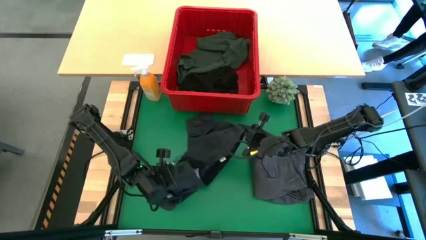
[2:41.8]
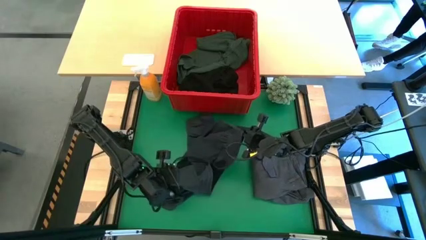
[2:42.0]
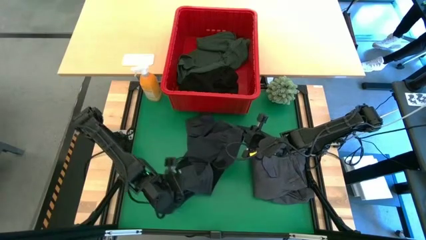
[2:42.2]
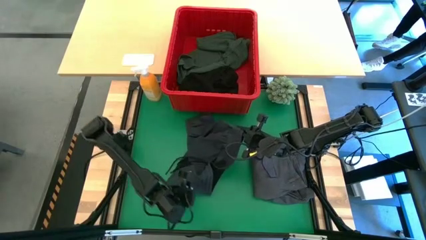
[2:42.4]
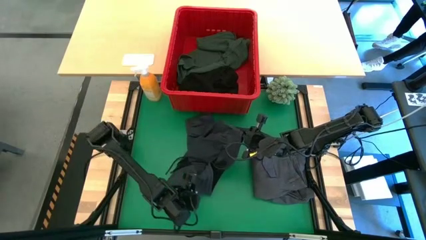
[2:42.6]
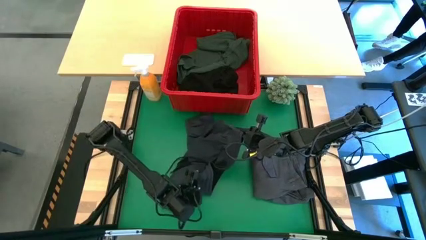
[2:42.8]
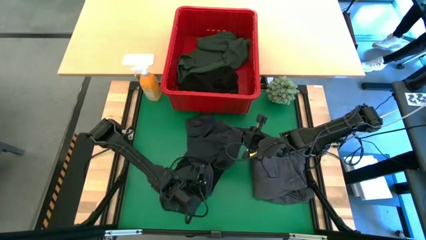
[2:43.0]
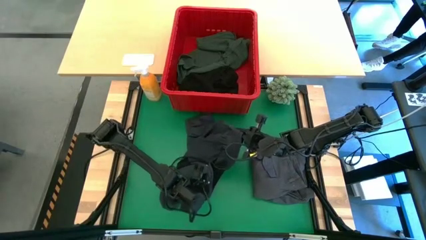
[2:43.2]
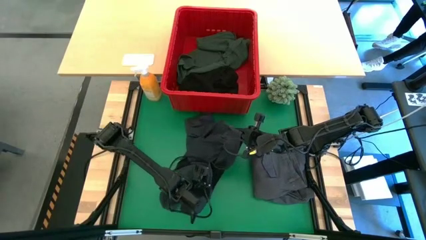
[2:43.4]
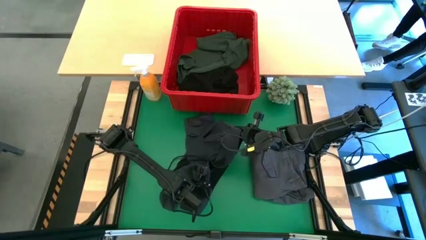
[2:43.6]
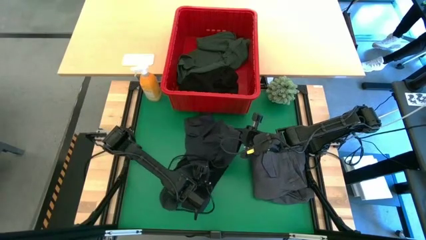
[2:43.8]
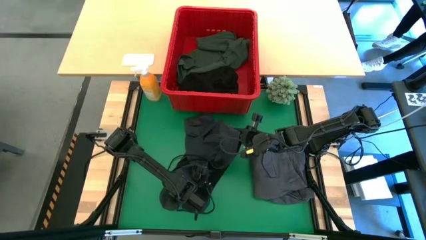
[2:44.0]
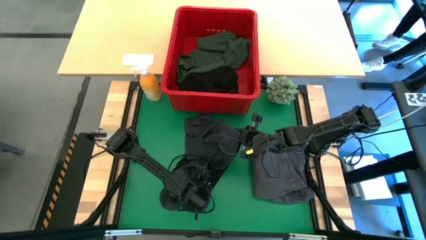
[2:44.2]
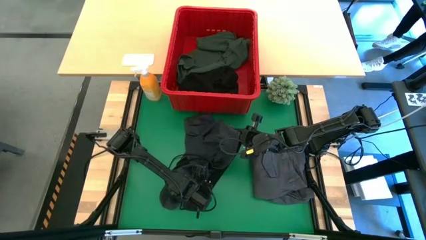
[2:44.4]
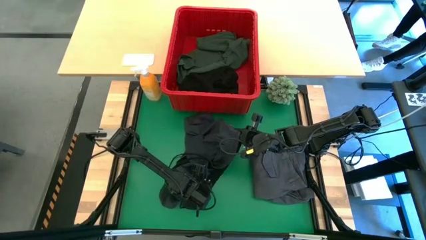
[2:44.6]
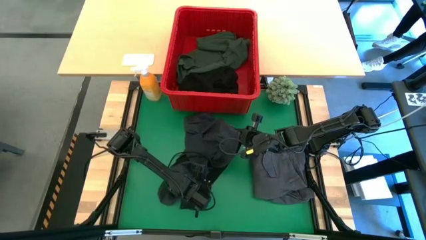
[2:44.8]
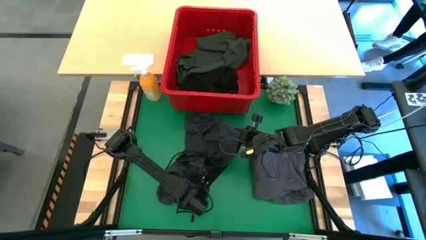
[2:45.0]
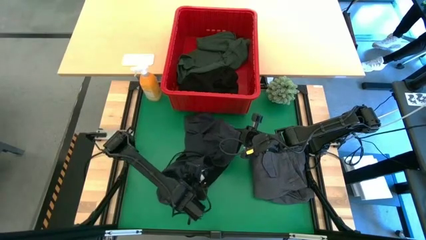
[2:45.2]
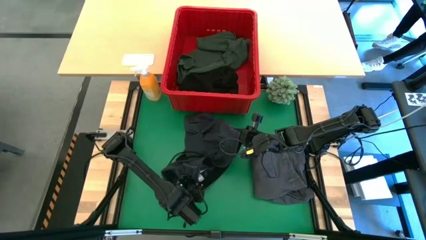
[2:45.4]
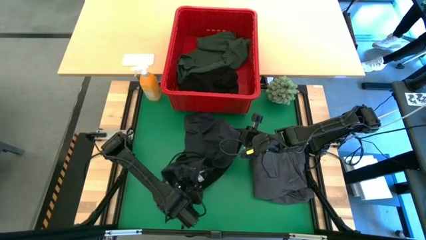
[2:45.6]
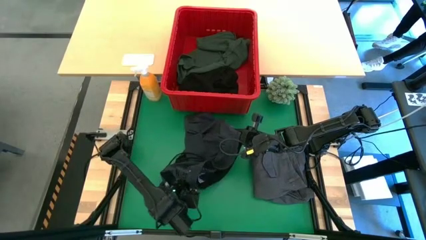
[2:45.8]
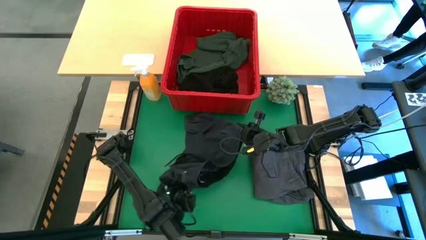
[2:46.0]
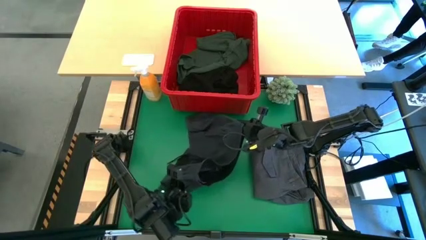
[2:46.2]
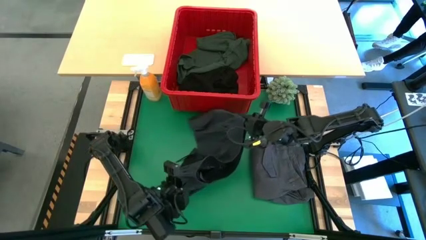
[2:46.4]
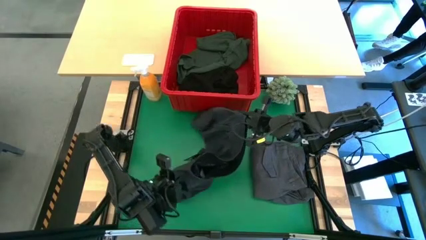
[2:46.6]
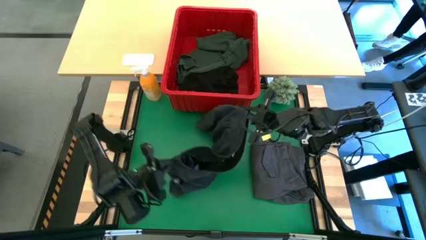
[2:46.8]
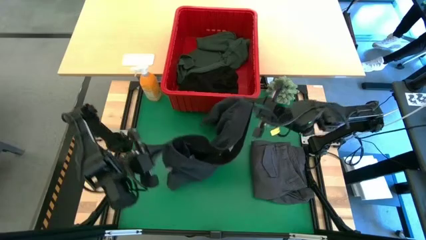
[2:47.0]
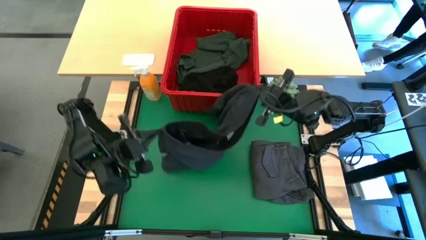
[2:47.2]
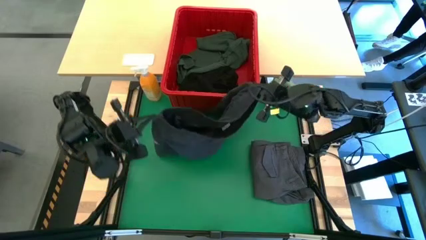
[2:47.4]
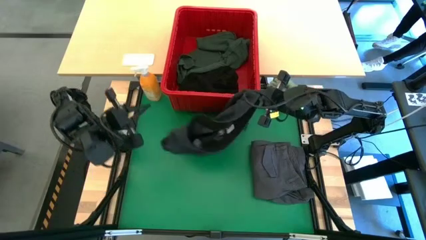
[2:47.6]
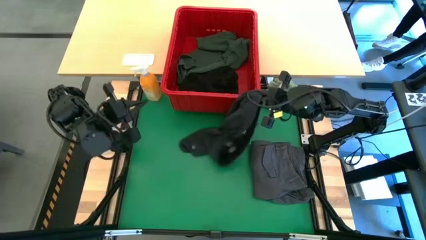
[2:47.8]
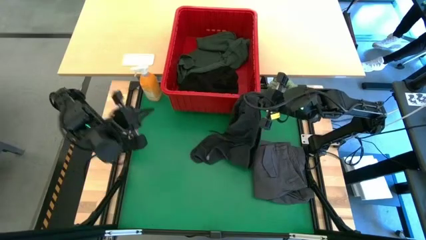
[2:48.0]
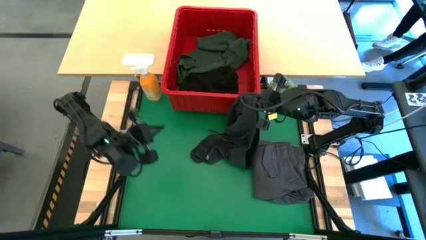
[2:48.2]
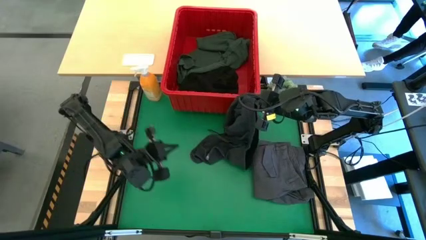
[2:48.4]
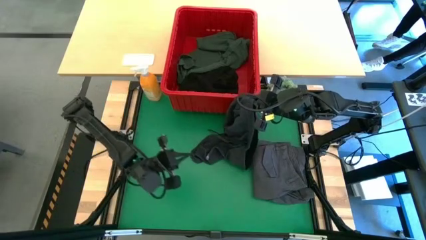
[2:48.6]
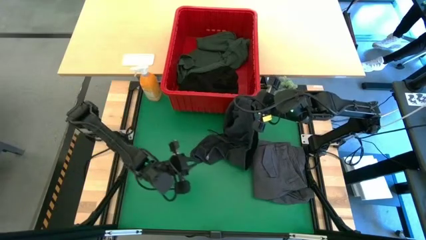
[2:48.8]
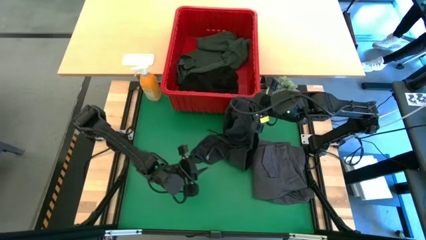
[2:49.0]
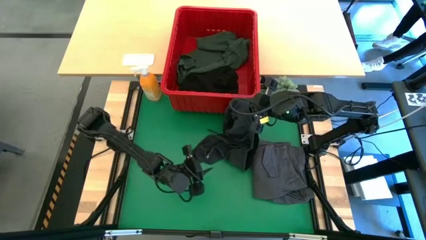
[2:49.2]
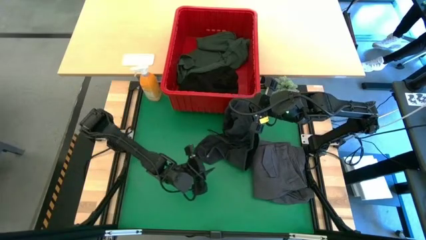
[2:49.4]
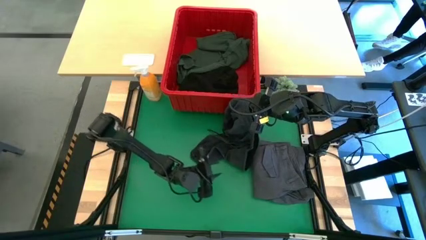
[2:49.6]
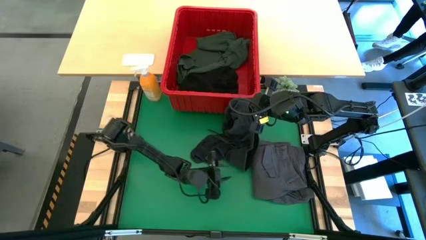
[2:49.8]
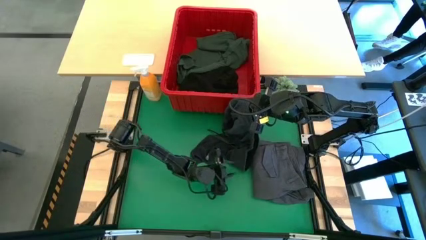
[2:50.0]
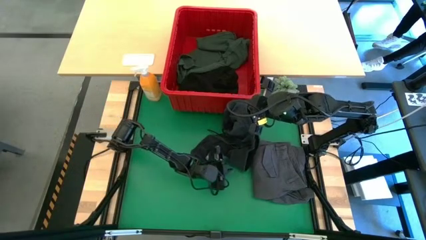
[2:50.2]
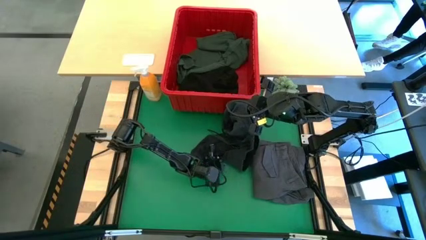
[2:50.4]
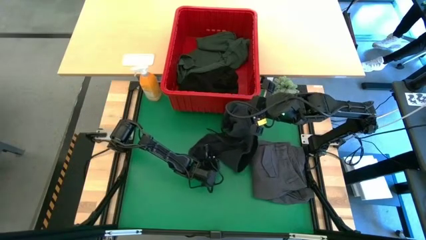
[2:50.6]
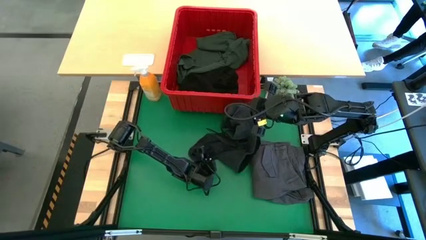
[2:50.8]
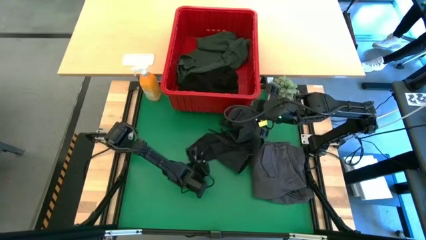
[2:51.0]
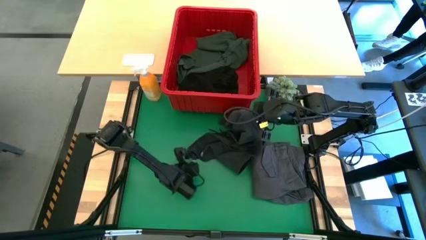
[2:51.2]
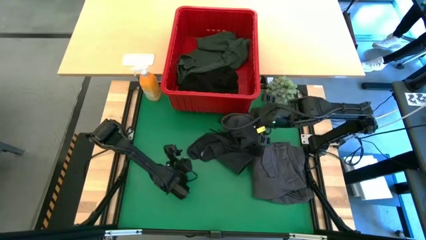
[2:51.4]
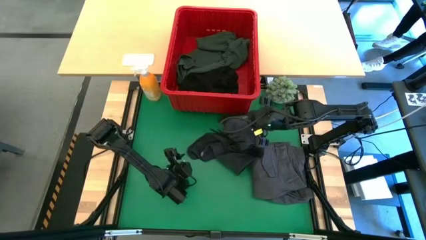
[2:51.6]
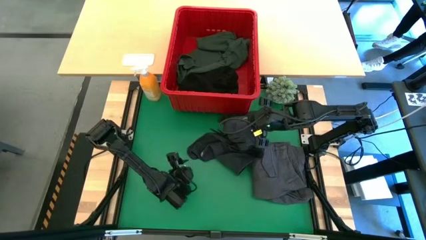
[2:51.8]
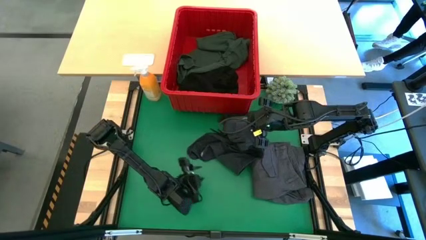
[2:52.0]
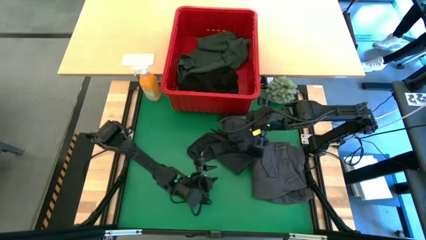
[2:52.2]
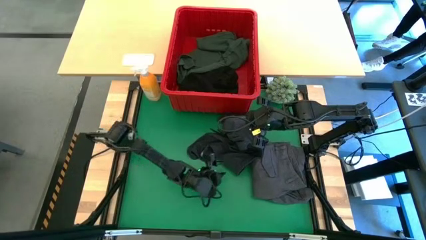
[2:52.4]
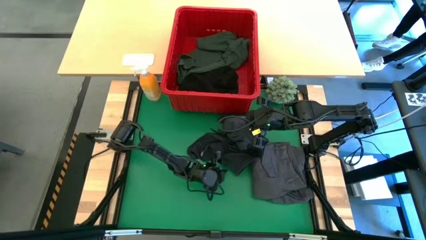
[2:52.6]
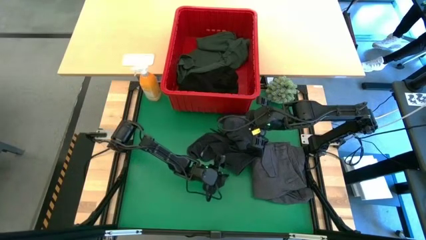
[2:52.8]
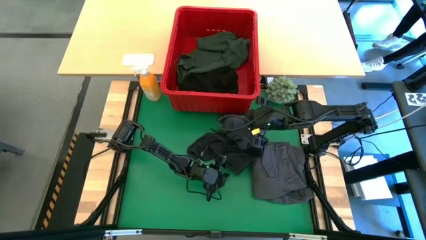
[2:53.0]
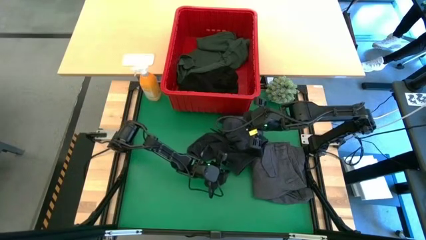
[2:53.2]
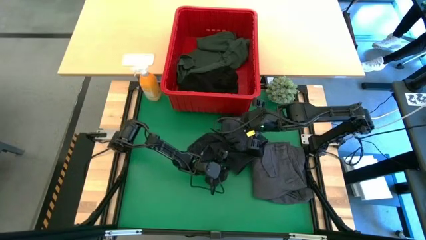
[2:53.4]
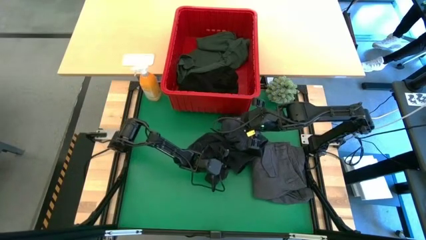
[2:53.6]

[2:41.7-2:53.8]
Task: Fold Laundry from Bin
Fold the dark gray short

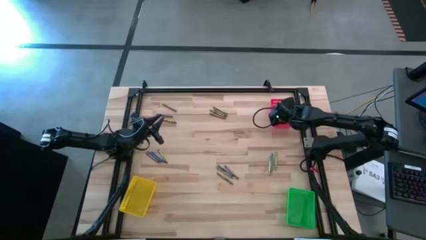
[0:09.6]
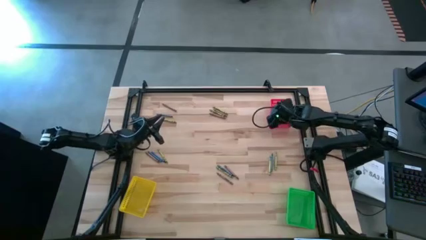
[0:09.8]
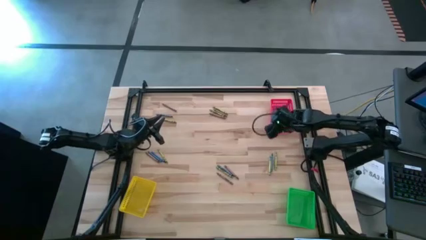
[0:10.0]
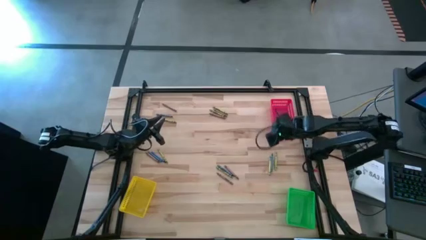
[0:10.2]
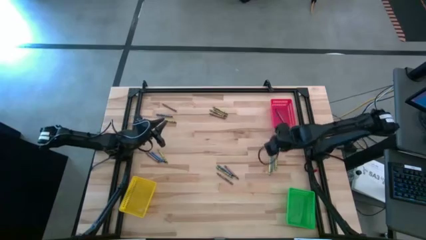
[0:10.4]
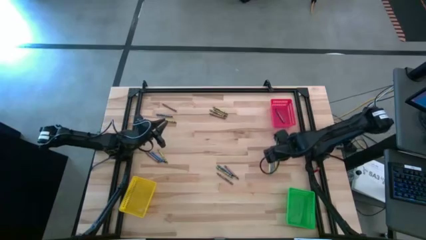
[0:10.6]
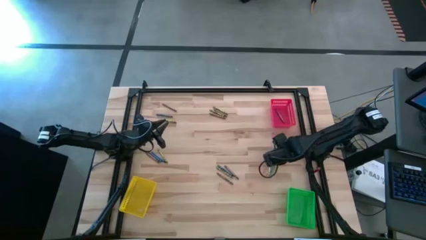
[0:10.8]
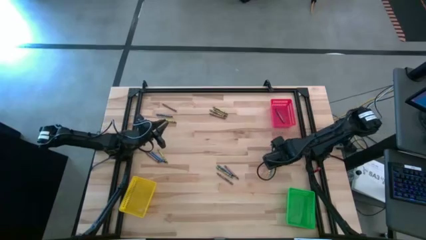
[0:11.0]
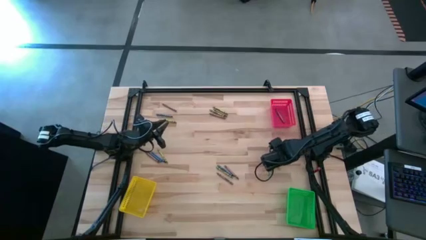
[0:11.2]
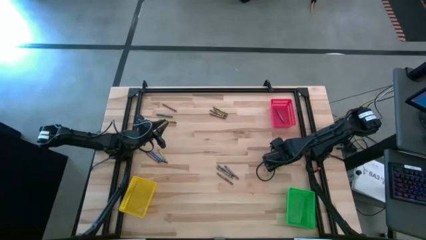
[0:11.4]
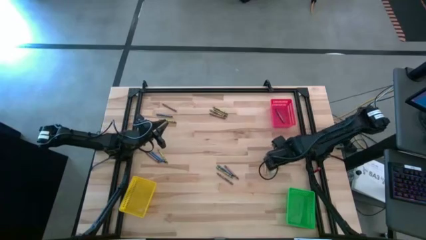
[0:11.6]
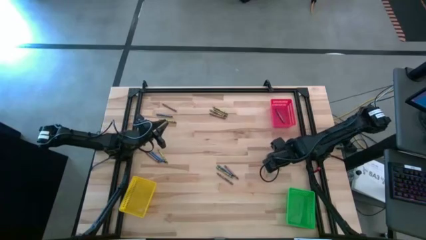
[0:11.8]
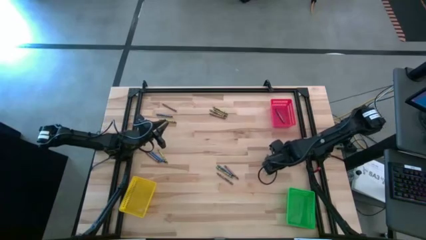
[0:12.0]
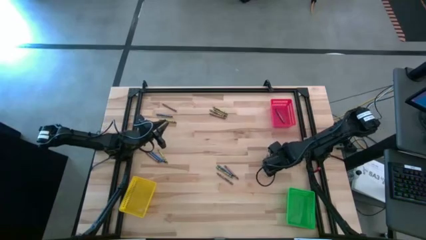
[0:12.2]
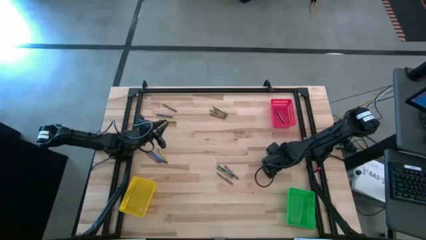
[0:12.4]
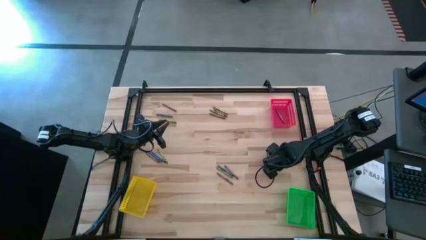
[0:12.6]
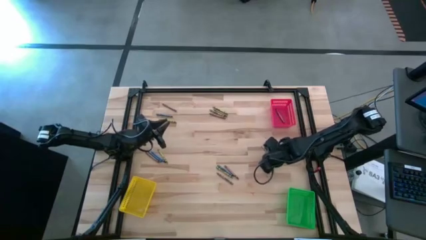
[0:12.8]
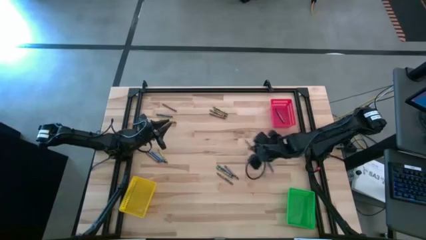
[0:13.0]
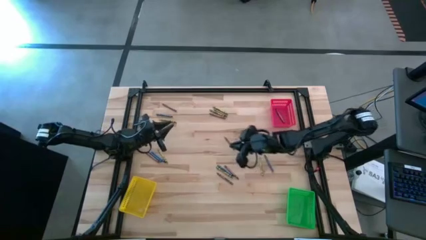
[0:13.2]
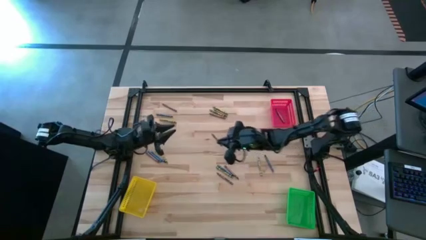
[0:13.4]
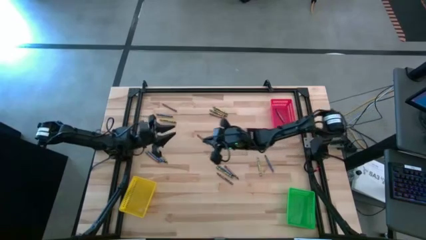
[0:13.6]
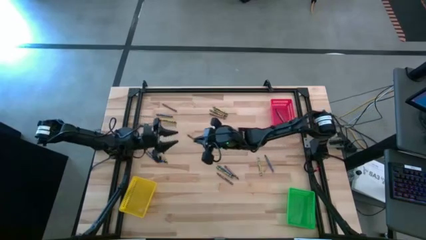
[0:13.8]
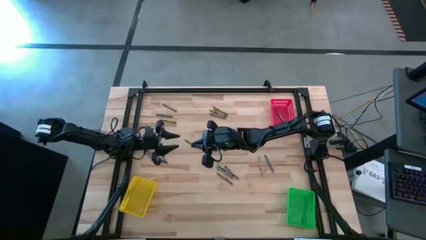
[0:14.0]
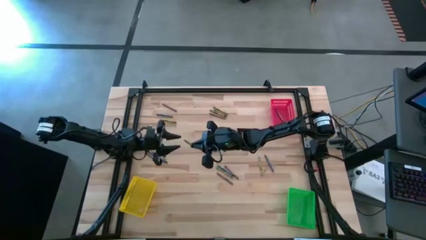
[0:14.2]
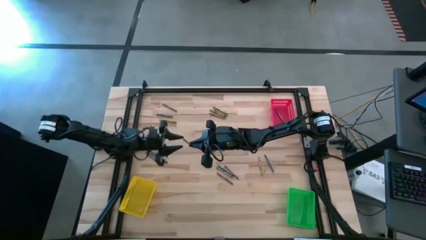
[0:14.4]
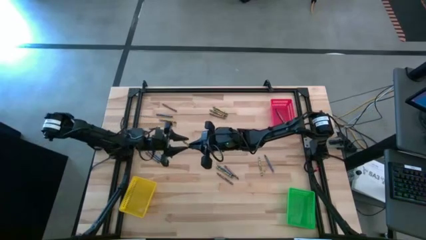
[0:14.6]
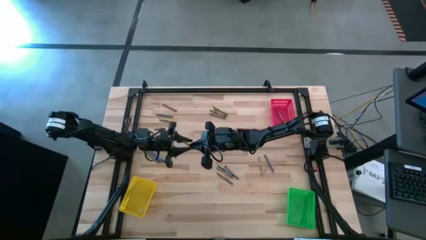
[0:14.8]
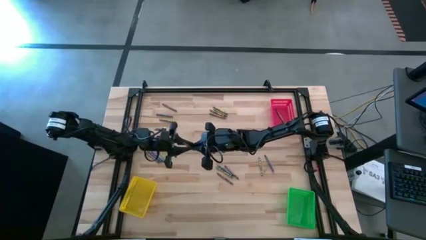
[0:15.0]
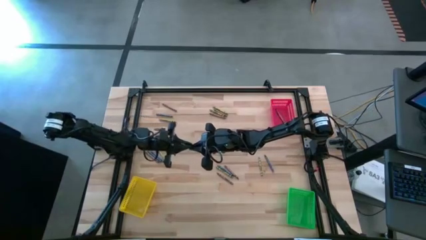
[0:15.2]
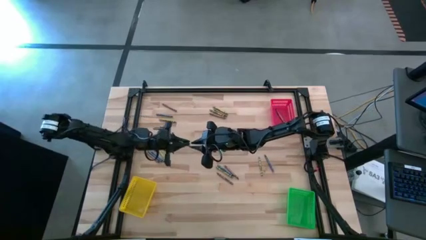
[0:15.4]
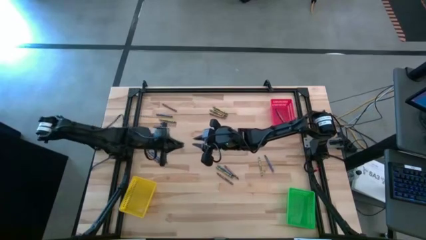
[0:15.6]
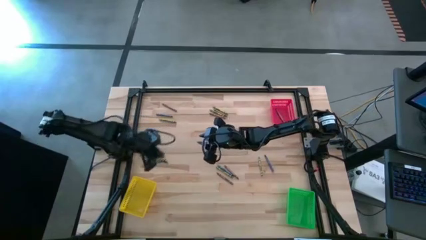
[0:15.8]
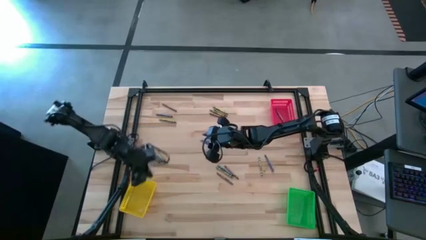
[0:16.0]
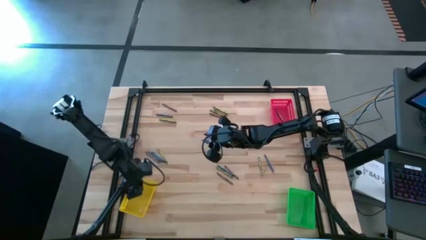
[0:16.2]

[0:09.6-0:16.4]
Task: Sort crayons
Put the green crayon into the yellow bin
